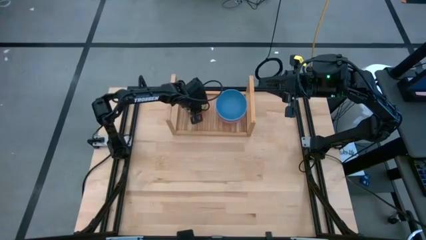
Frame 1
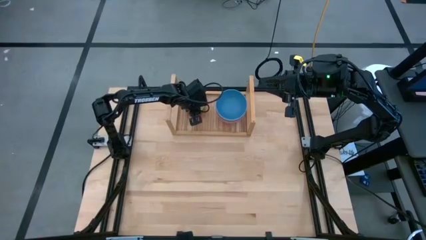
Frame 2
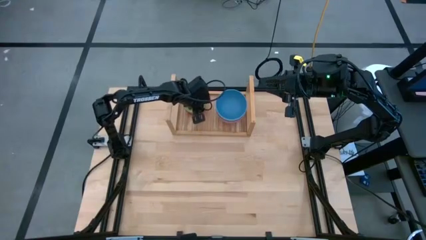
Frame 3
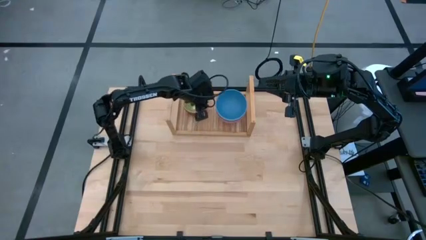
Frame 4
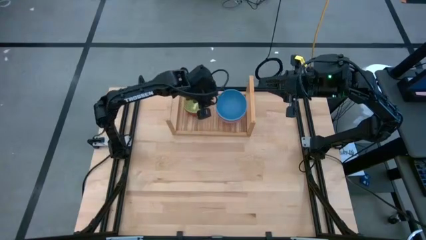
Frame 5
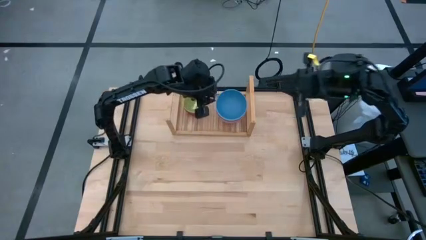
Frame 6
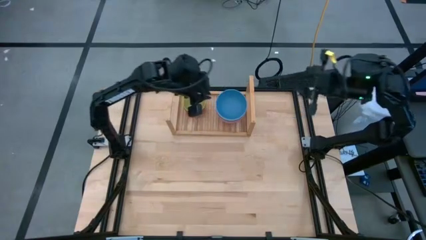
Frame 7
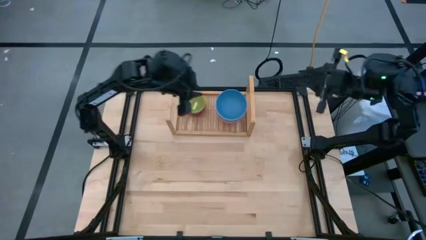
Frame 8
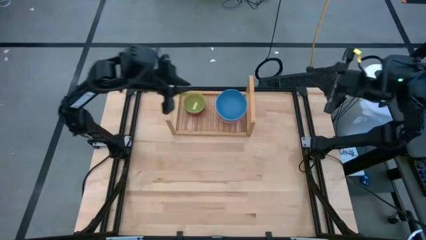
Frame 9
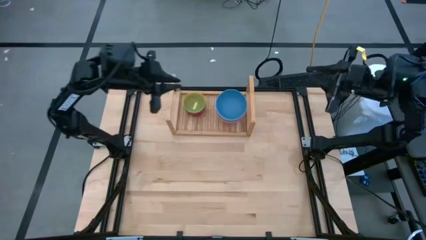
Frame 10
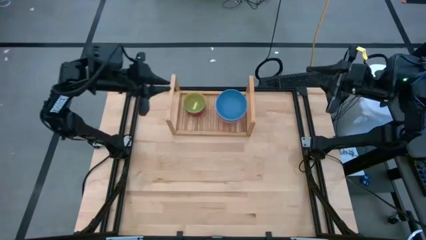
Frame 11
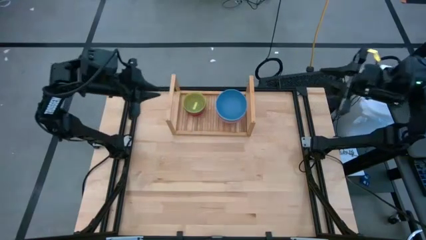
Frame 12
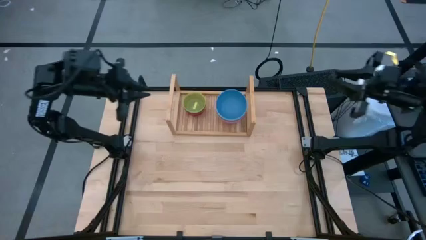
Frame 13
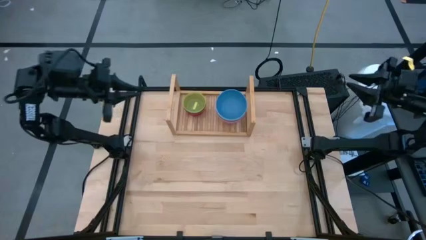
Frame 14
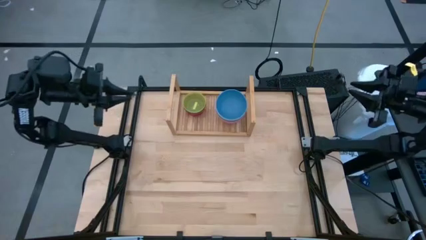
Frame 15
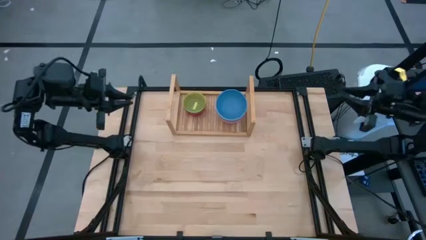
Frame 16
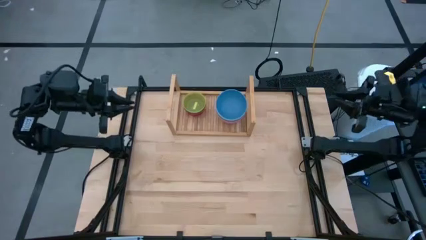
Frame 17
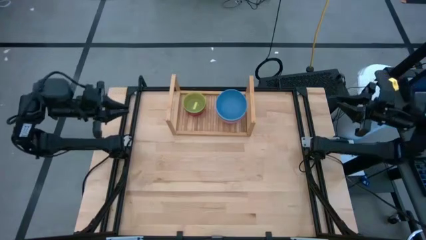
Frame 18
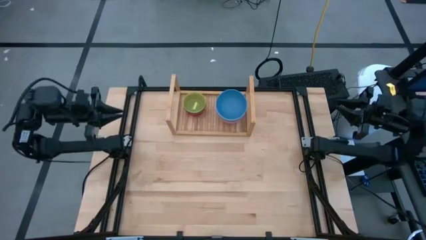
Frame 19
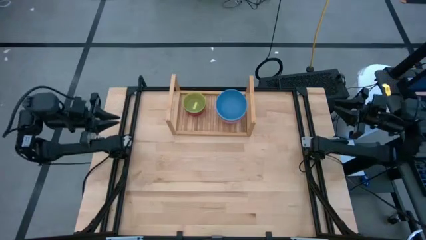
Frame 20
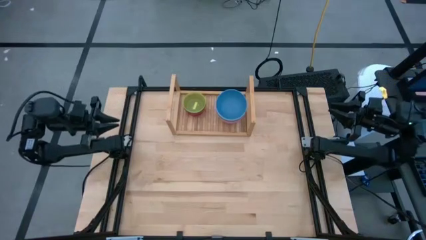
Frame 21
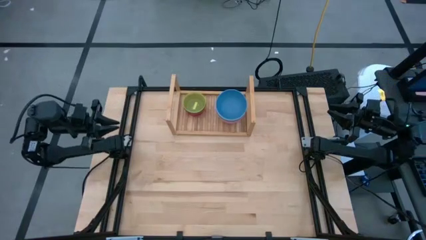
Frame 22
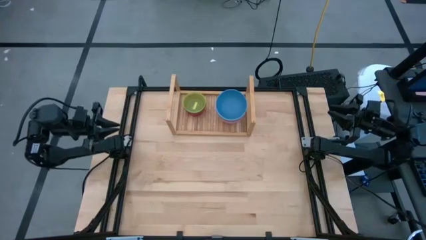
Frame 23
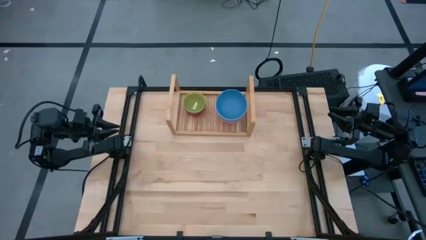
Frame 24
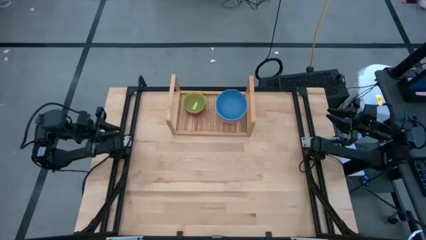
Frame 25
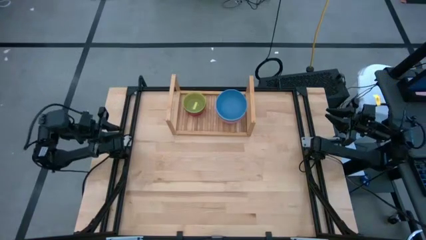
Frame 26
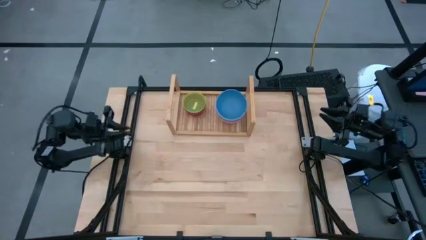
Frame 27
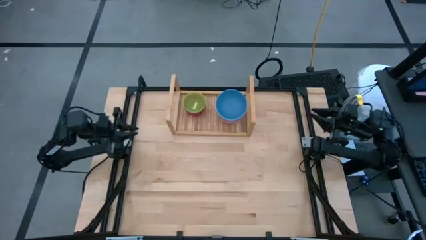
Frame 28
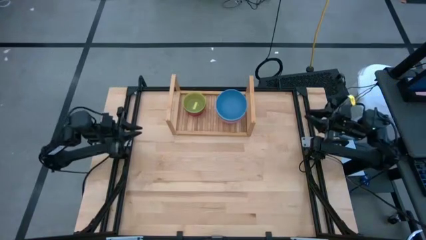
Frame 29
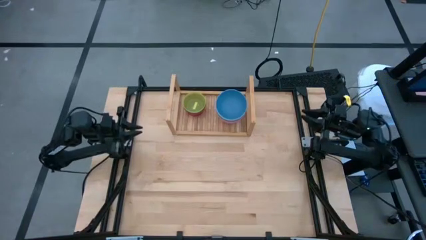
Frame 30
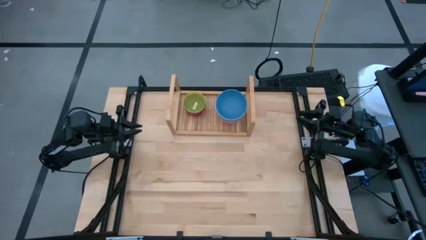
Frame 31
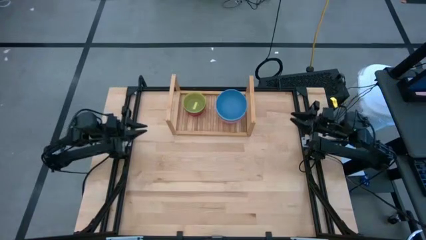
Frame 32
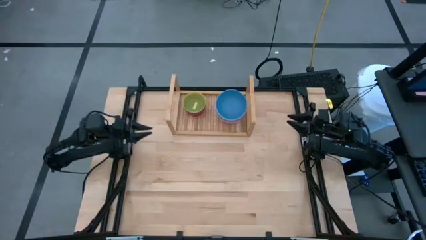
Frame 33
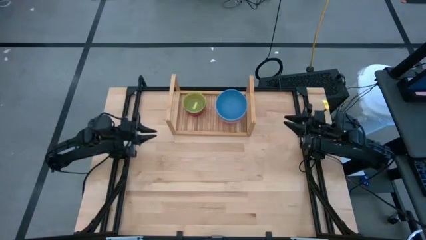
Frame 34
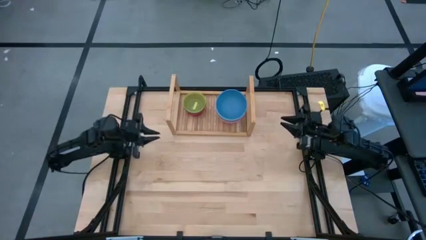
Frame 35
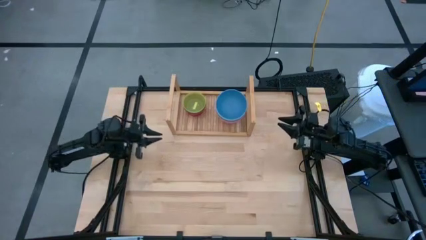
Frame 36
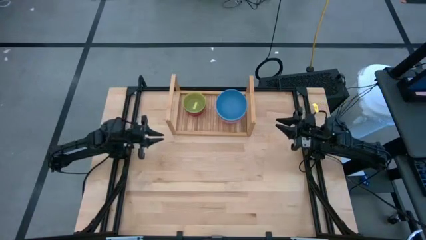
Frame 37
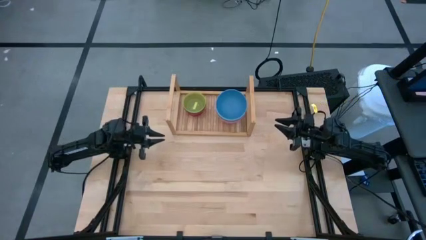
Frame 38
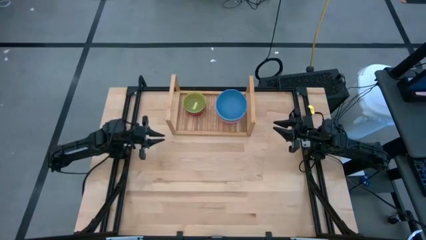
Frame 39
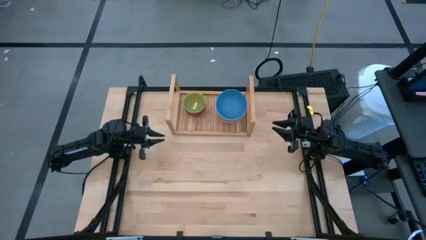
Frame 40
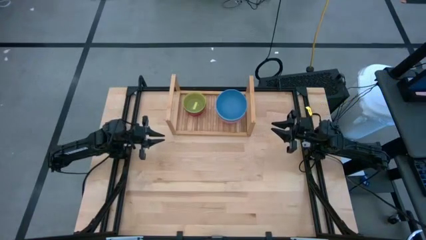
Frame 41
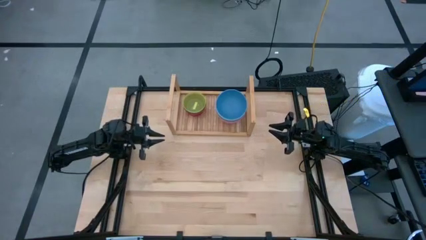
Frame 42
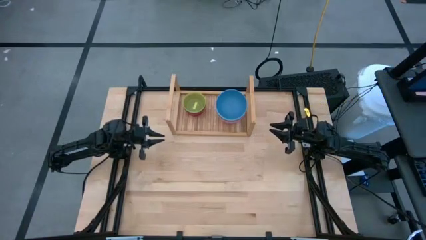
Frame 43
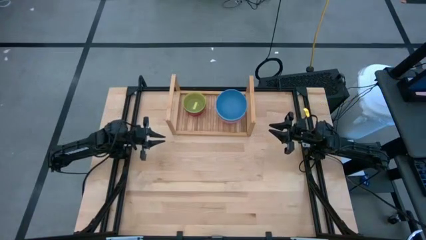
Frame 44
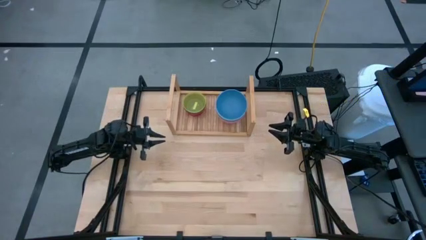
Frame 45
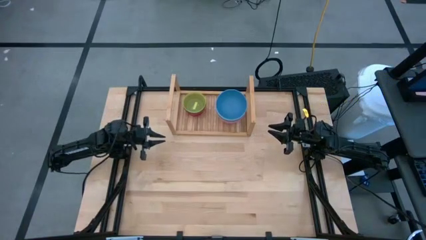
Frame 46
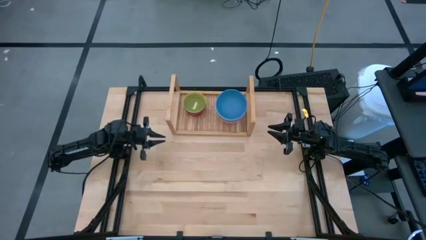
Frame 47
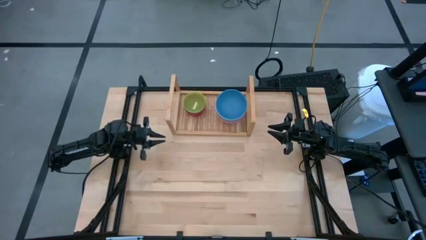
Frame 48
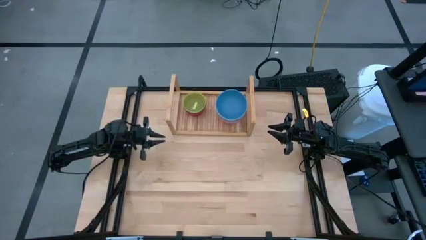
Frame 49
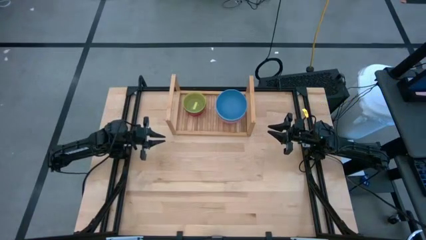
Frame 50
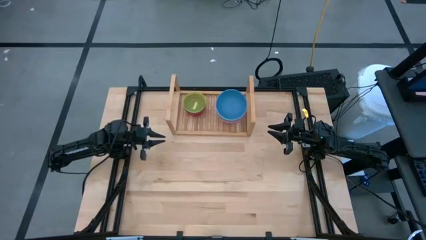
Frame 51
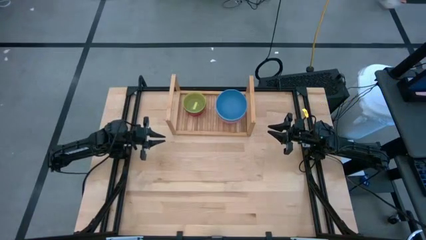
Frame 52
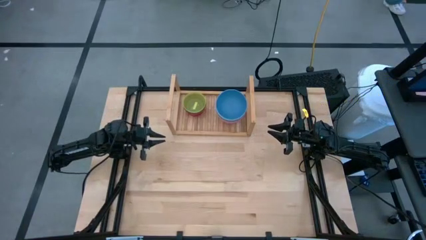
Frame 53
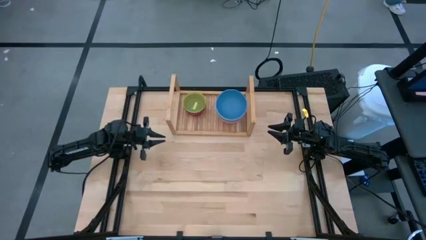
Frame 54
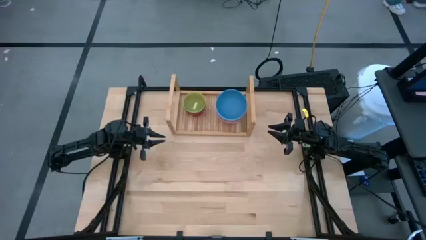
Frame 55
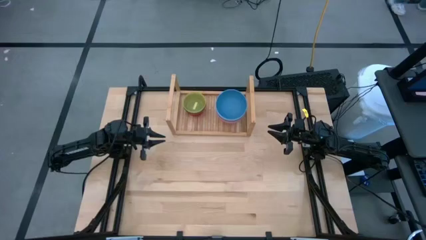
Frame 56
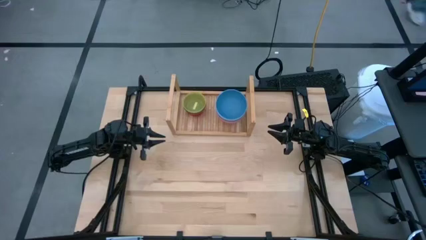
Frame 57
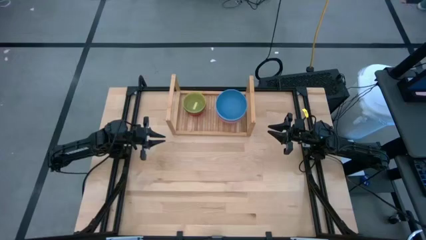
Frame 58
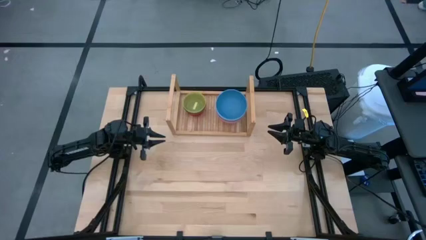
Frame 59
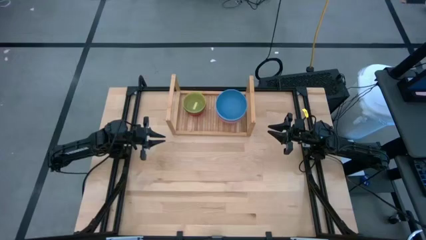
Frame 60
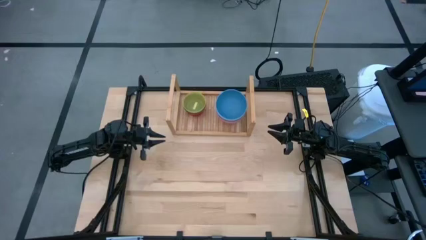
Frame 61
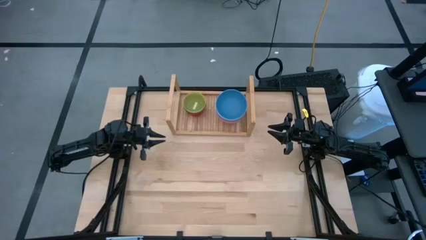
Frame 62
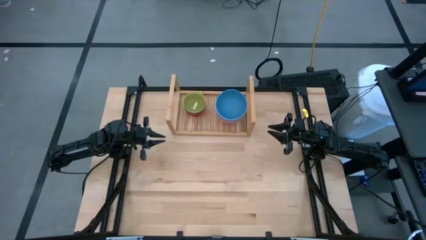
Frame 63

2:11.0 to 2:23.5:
Task: Place and stack bowls onto a shelf
Return to Home Position

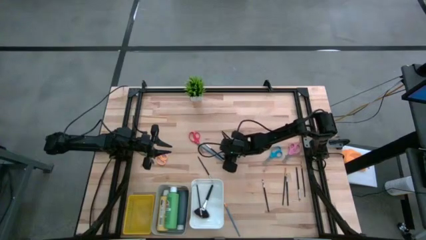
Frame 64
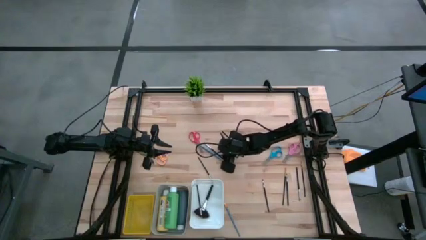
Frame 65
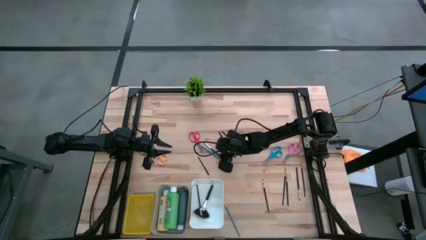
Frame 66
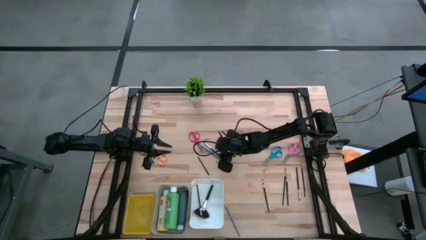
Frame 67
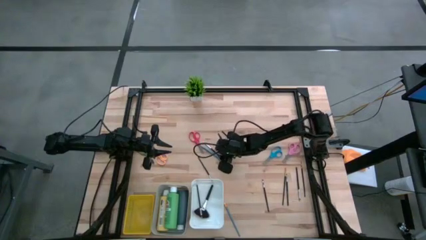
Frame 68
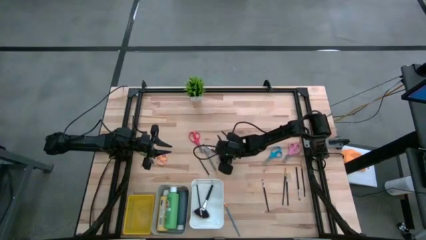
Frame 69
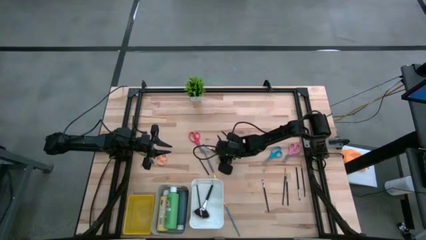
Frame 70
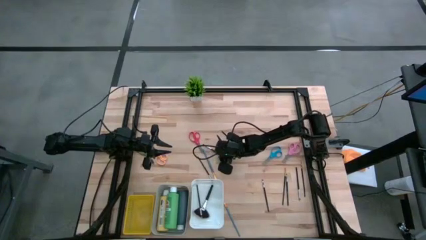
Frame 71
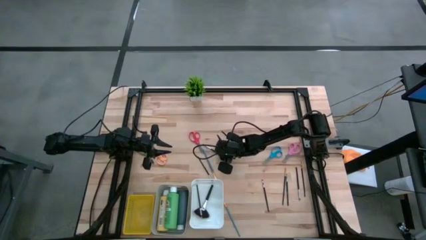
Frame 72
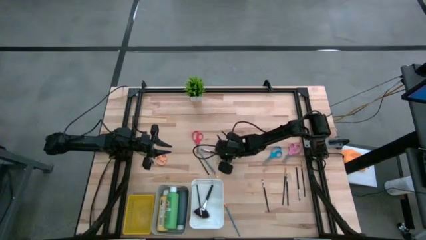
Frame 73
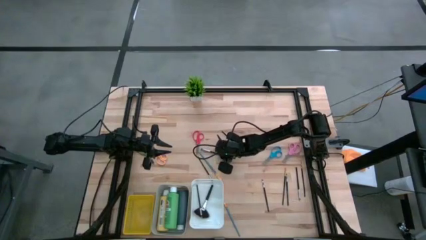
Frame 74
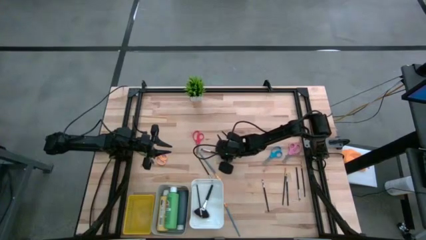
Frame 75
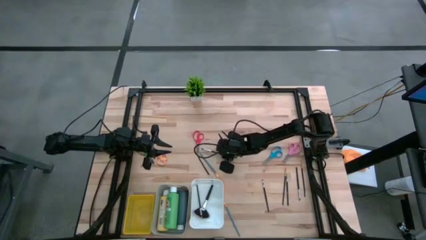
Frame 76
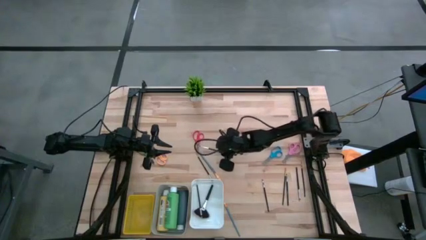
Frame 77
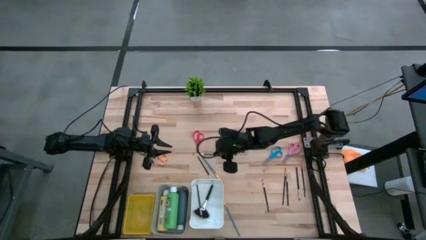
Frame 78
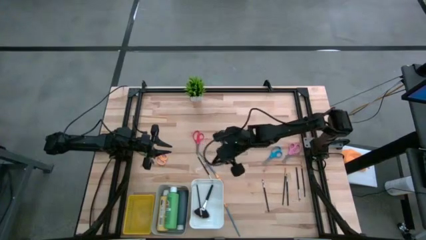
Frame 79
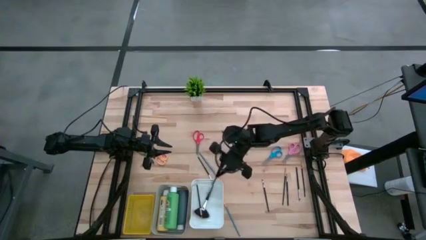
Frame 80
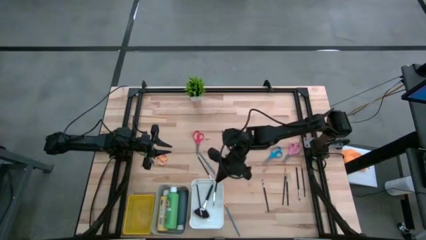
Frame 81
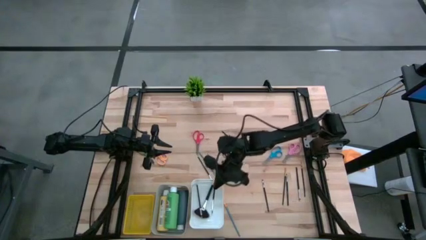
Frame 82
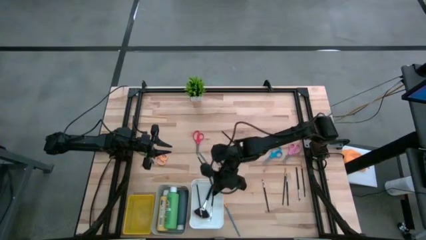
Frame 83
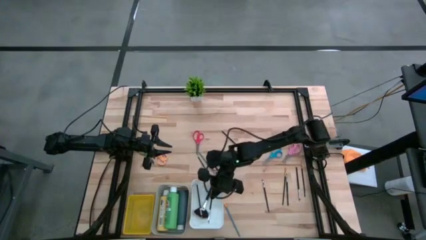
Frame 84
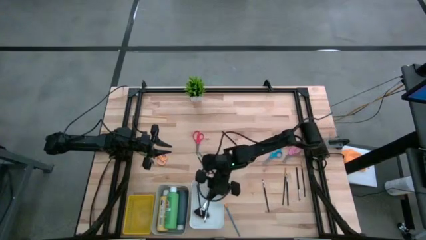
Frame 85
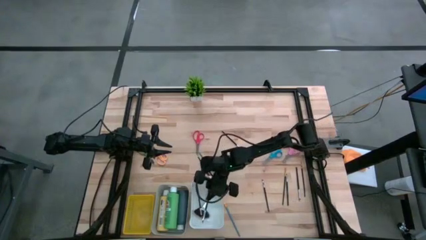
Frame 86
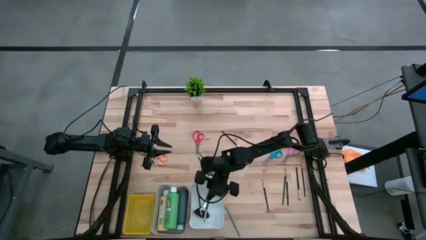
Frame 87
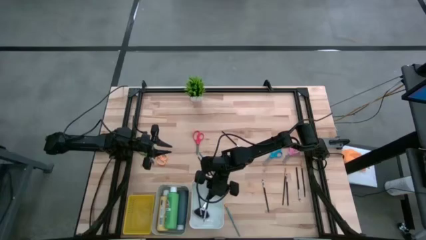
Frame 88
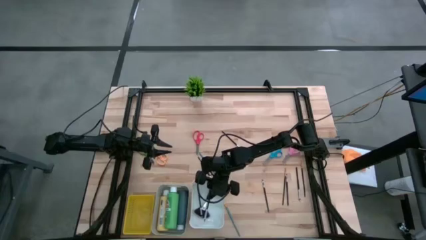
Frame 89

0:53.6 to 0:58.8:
Task: Pick & Place Paint Supplies
Put the black paint brush into the white bin
